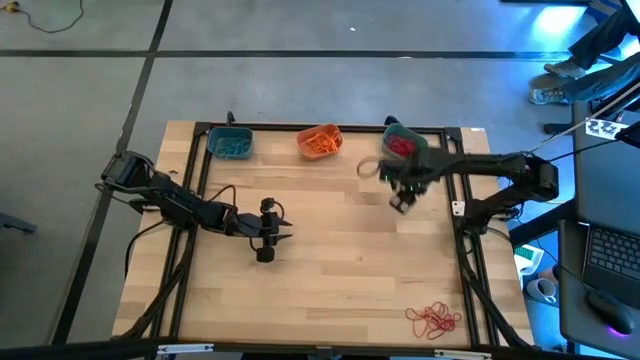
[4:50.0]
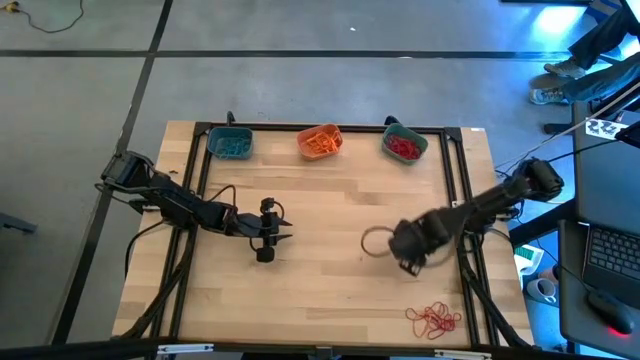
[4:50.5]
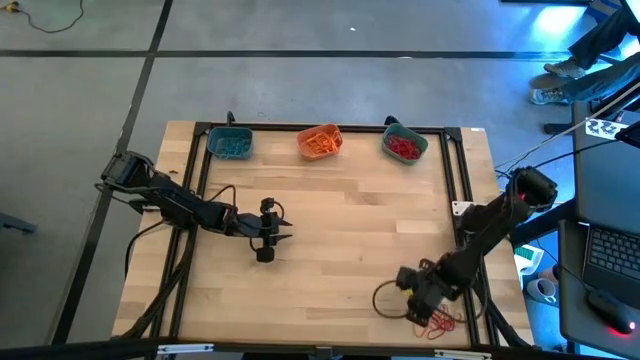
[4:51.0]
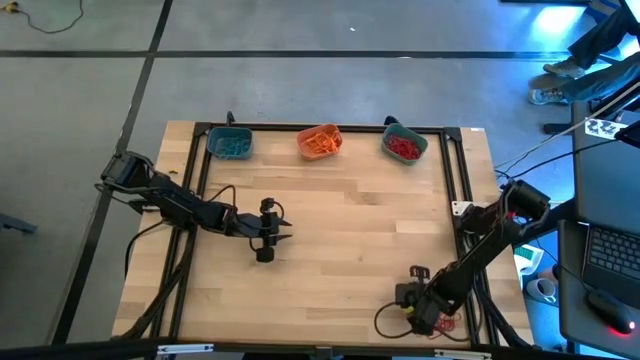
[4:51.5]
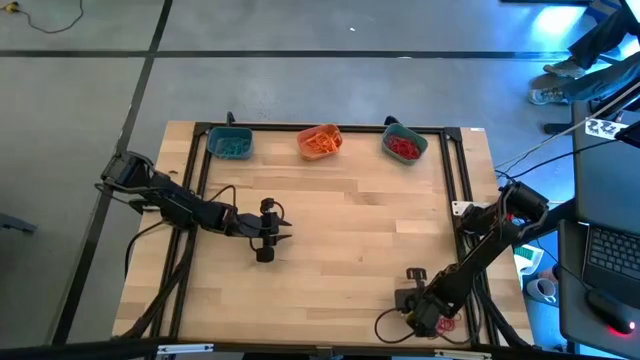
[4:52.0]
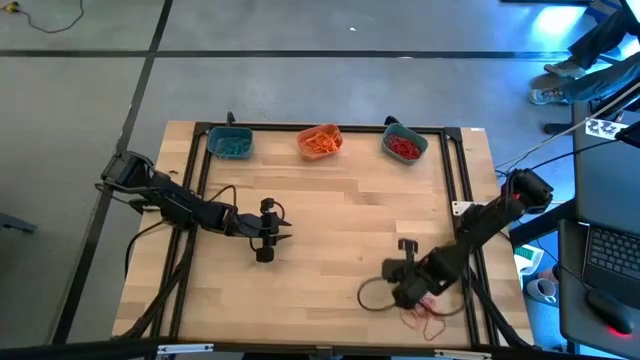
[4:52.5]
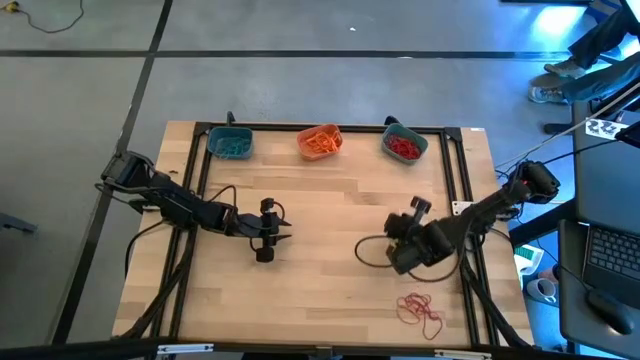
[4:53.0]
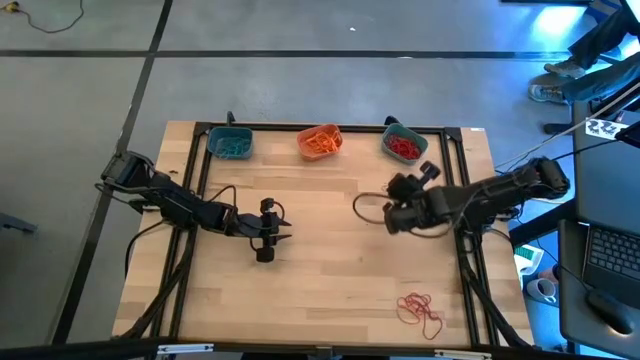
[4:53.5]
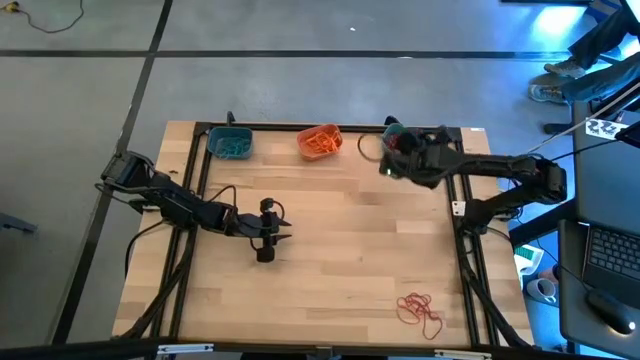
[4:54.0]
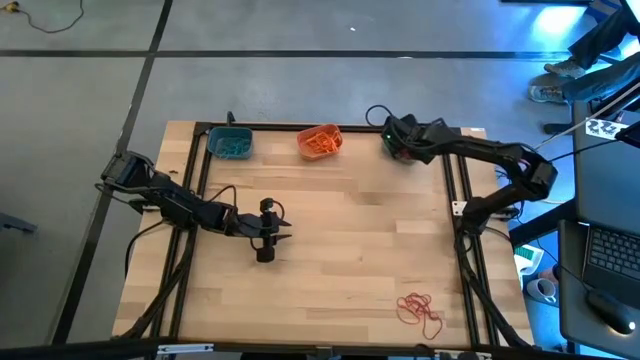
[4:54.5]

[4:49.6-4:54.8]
Task: Sort rubber bands into baskets
Put the red rubber band into the green bin

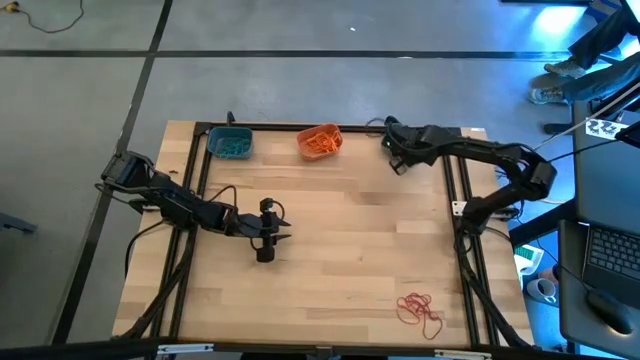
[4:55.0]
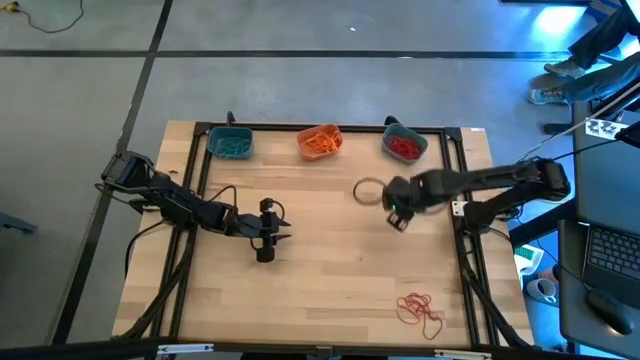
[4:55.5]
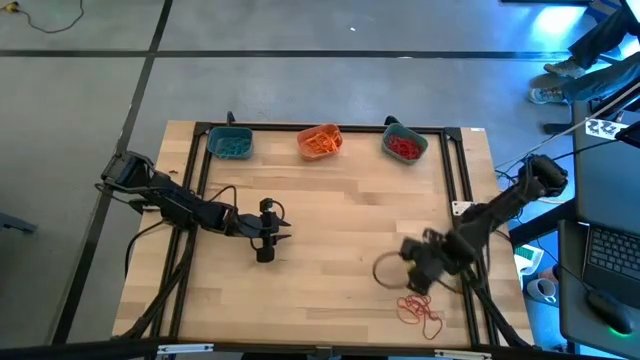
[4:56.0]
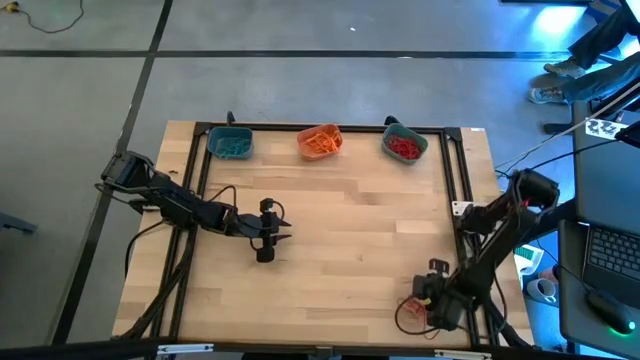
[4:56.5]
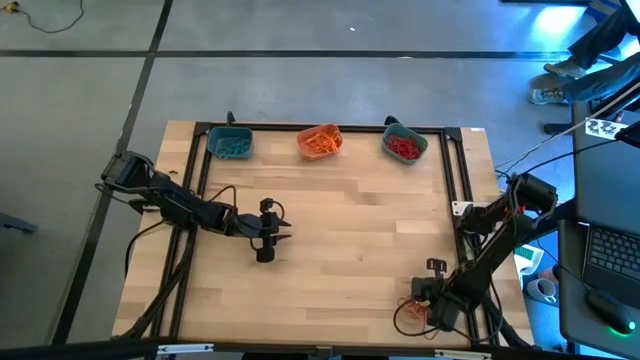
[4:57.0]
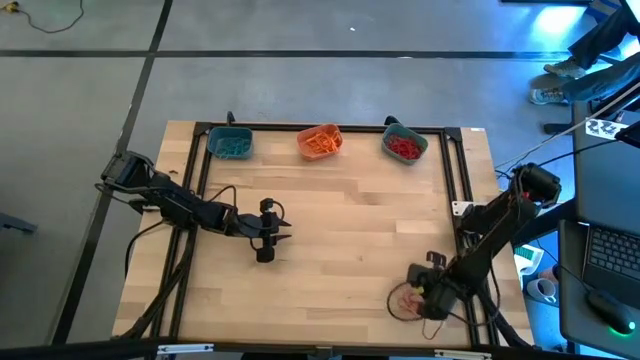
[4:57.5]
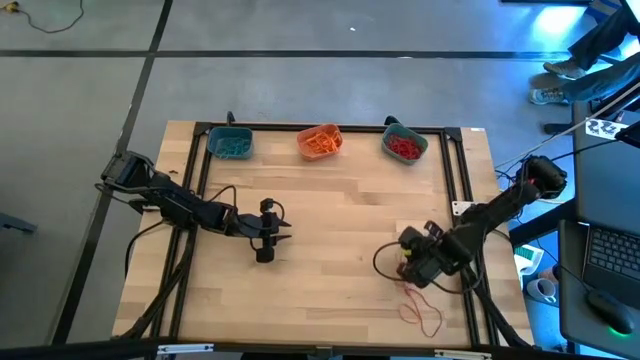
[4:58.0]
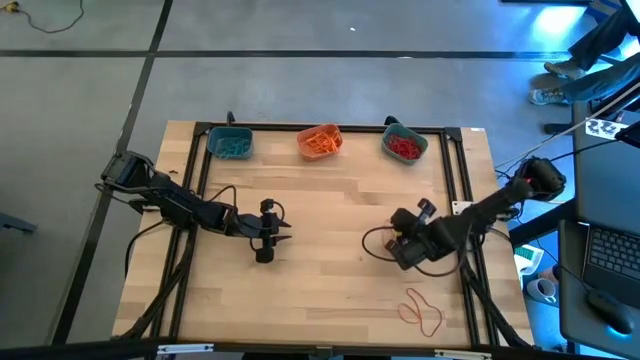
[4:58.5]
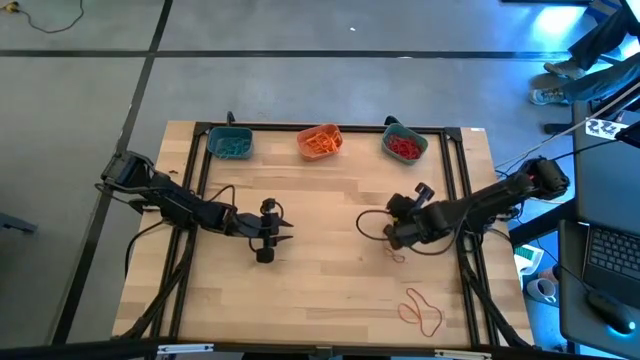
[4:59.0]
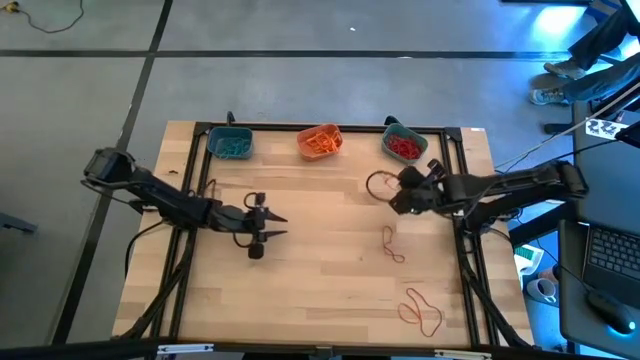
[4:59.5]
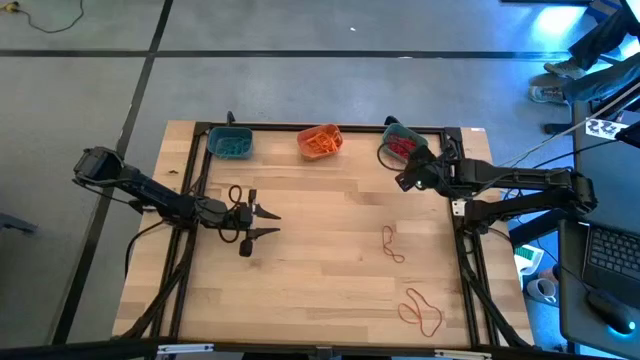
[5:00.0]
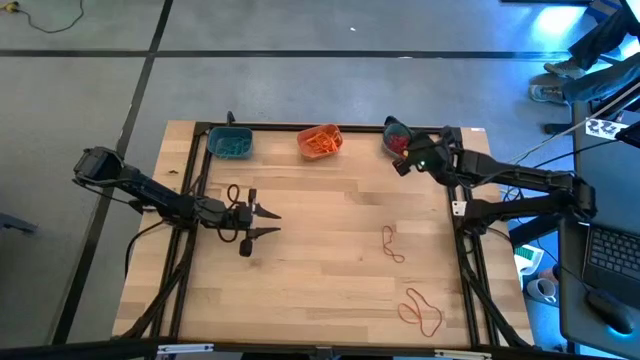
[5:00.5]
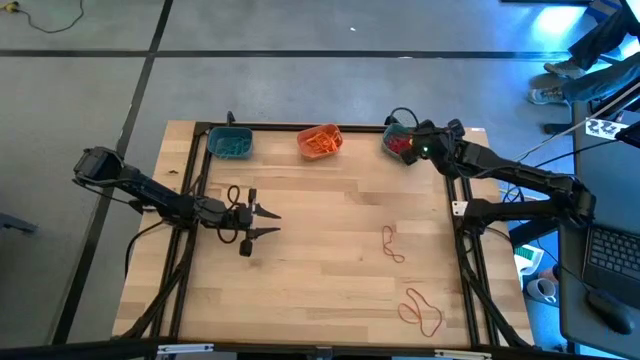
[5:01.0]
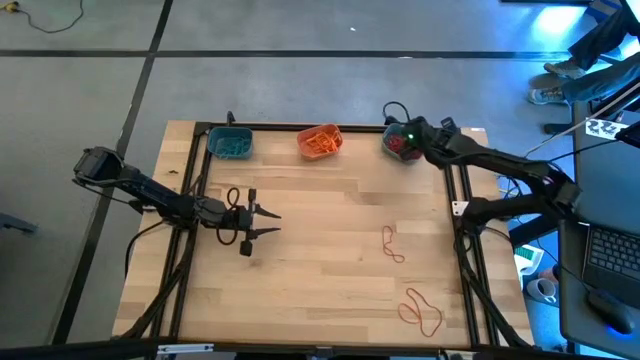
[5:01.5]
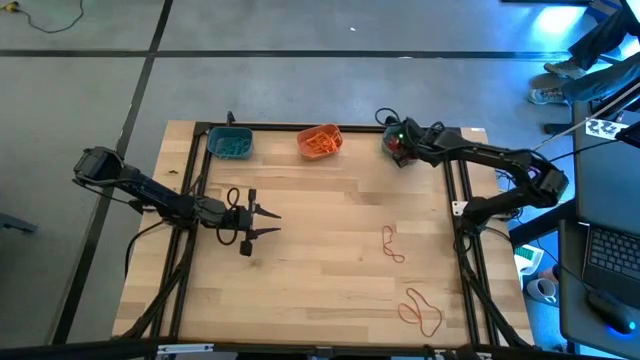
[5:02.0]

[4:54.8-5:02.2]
Put the red rubber band into the green bin

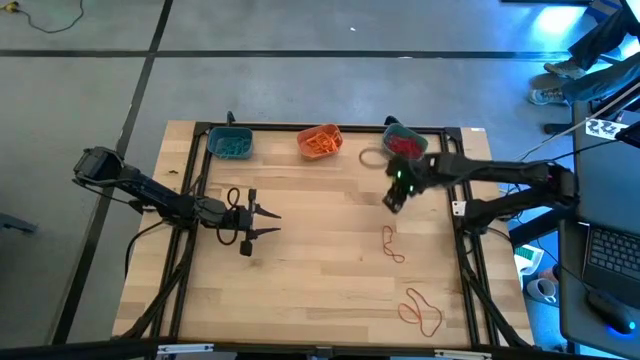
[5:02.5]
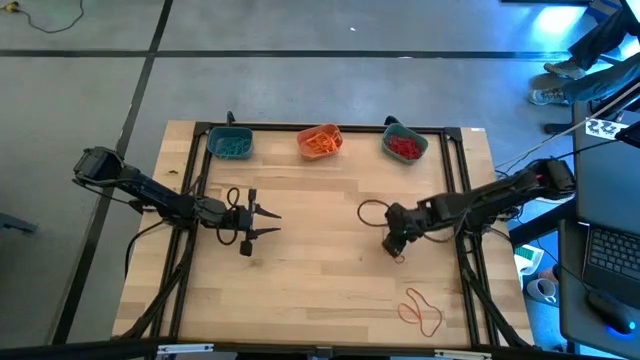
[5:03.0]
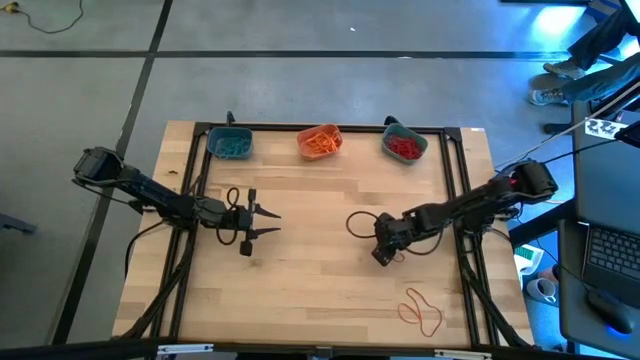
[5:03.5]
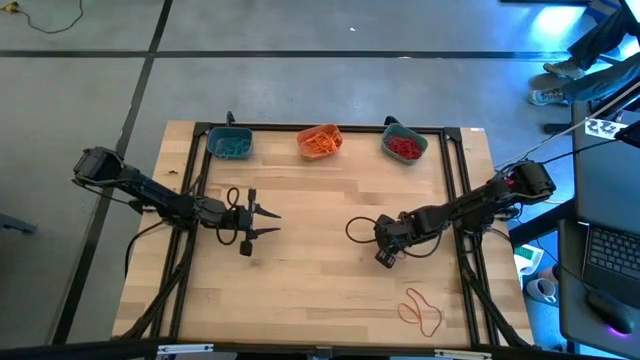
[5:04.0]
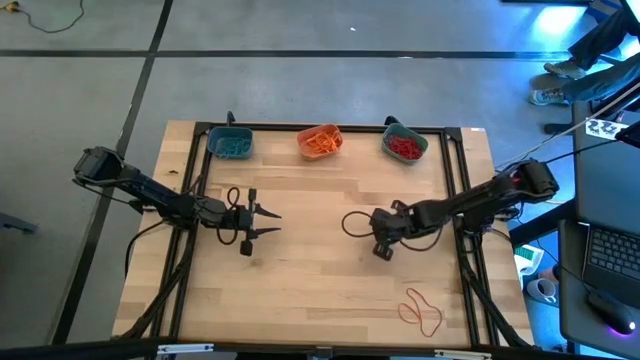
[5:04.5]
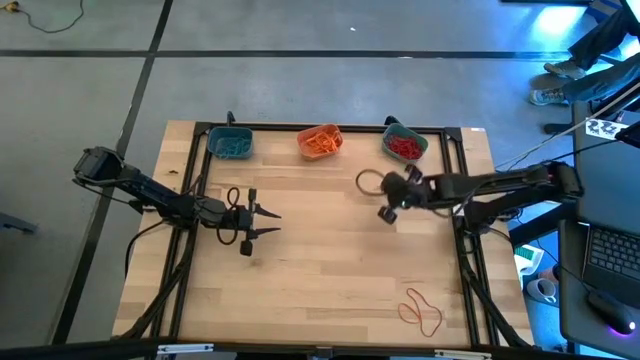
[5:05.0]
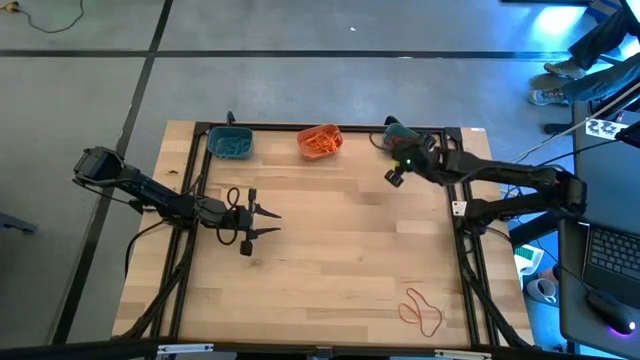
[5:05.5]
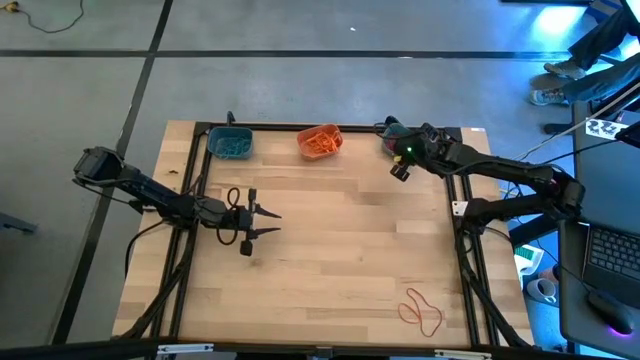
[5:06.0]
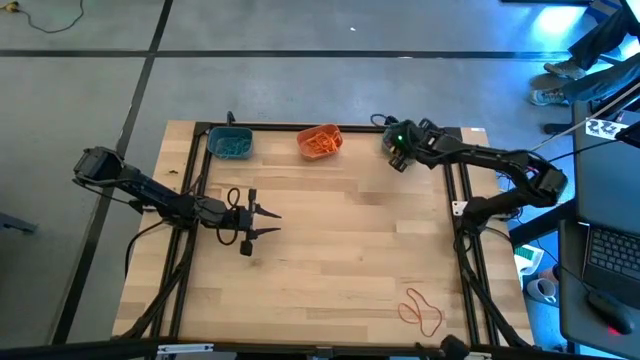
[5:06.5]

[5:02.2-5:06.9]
Put the red rubber band into the green bin

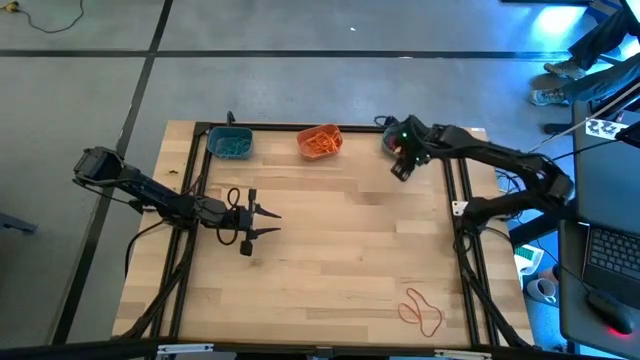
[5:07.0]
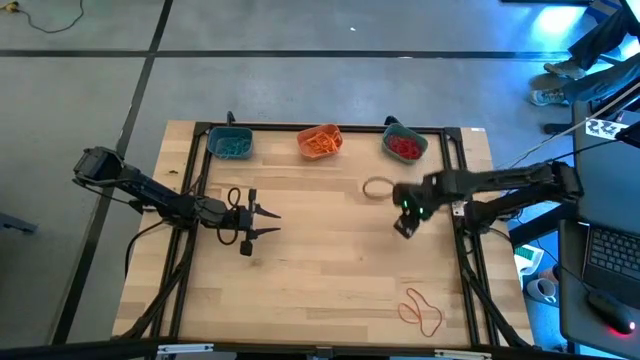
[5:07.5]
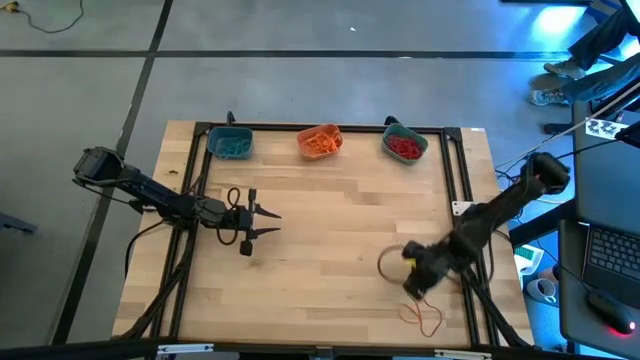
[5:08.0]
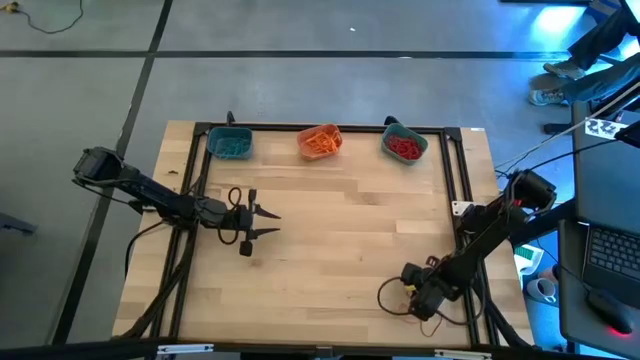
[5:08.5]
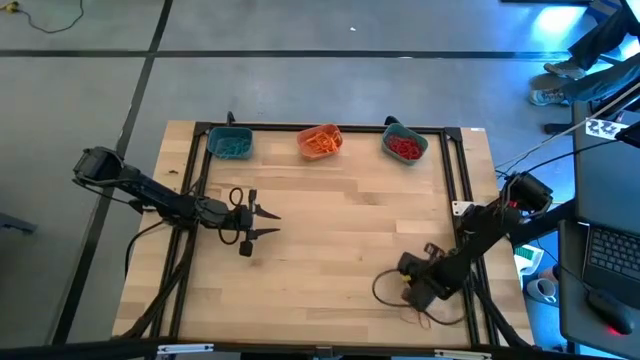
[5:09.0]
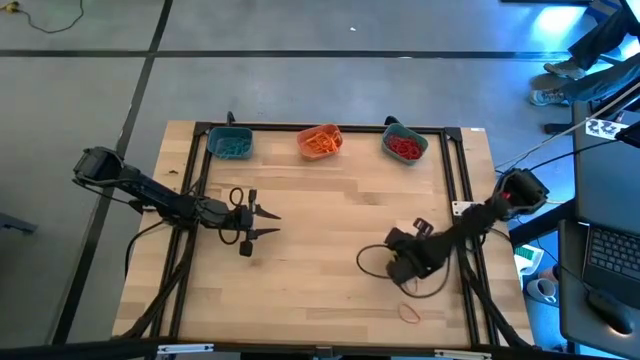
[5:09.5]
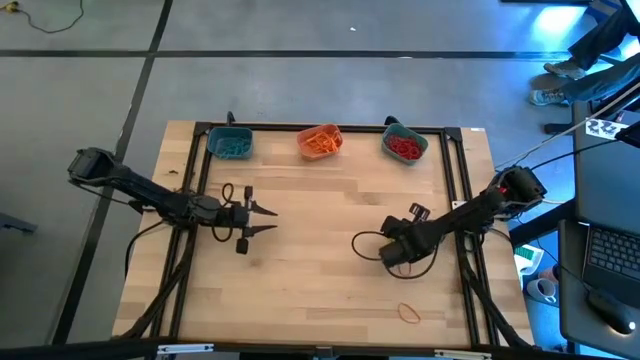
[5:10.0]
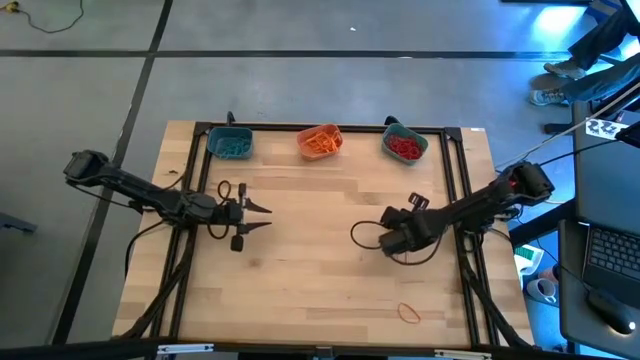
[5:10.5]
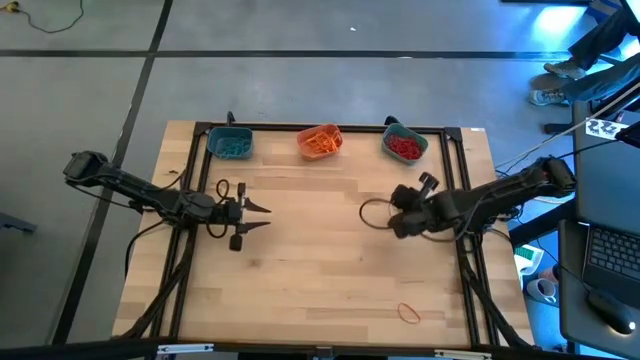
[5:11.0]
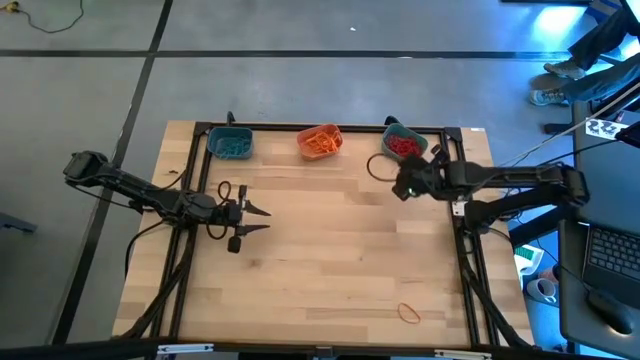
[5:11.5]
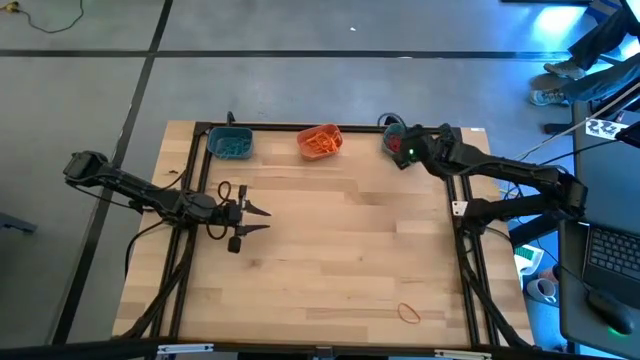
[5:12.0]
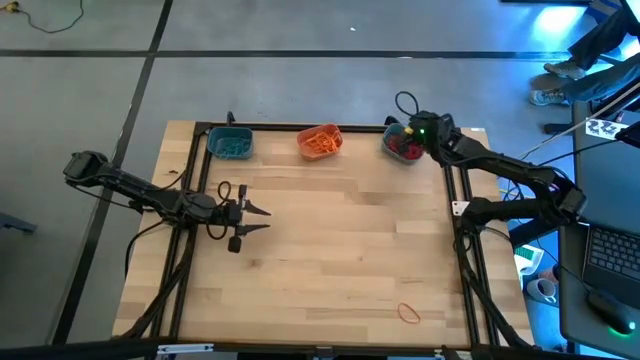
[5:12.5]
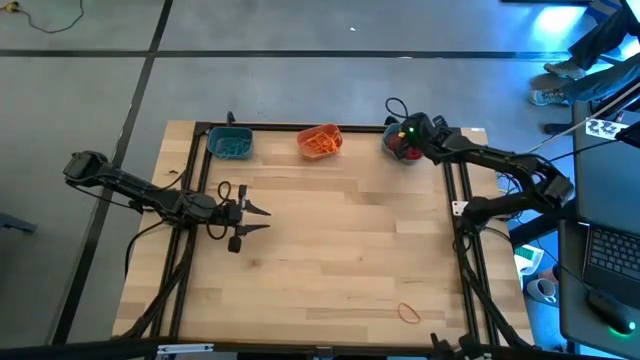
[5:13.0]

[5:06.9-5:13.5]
Put the red rubber band into the green bin
